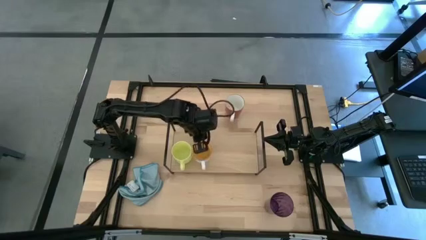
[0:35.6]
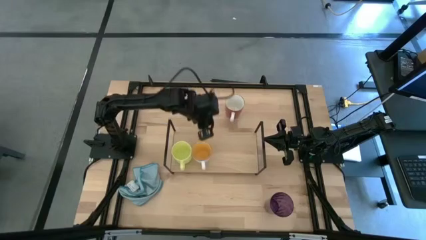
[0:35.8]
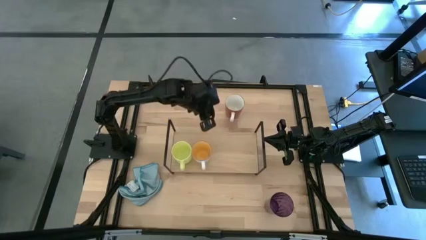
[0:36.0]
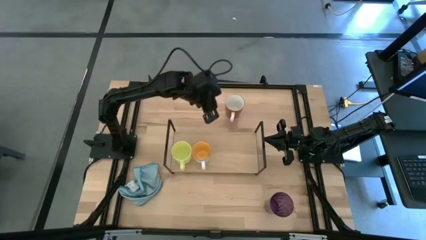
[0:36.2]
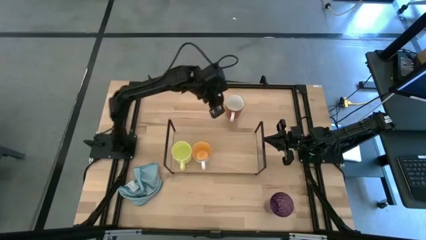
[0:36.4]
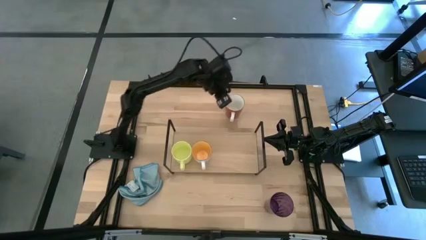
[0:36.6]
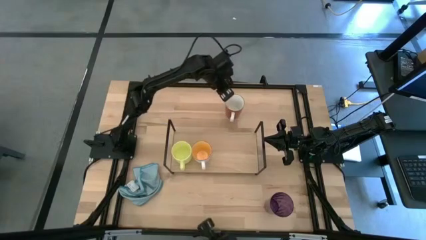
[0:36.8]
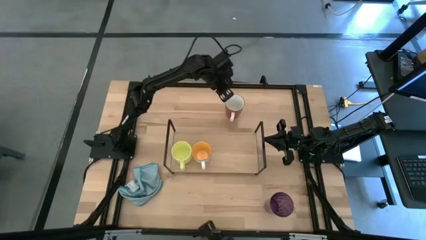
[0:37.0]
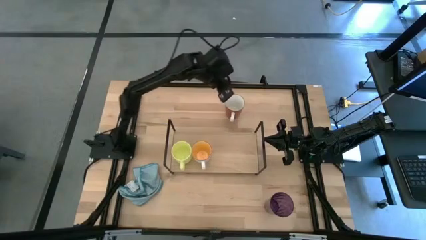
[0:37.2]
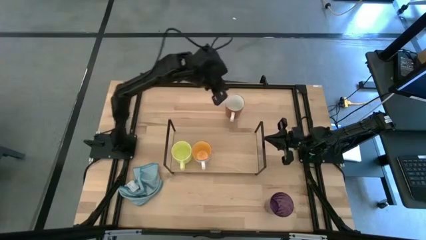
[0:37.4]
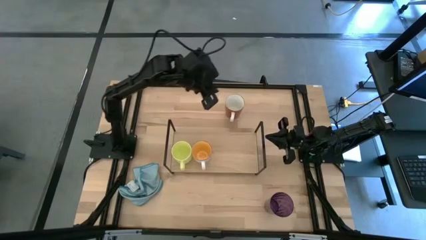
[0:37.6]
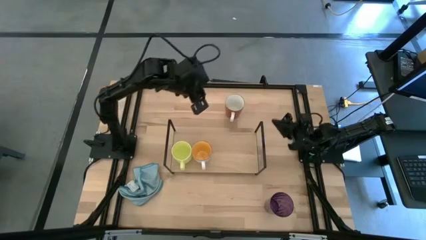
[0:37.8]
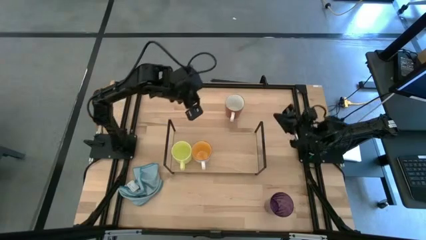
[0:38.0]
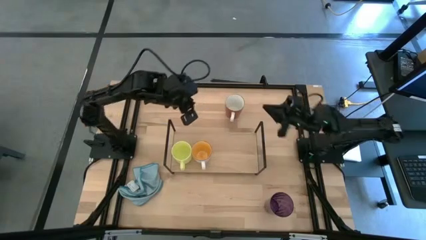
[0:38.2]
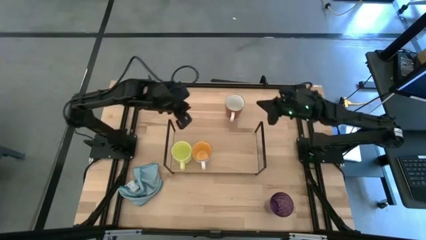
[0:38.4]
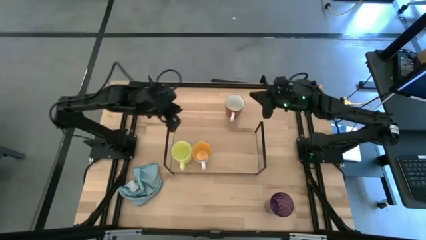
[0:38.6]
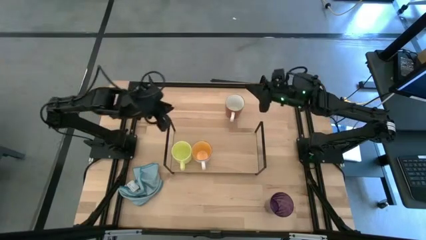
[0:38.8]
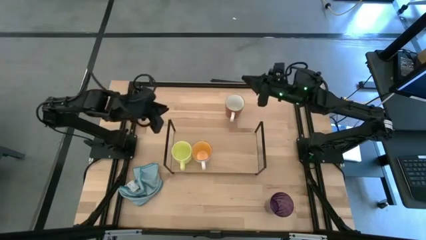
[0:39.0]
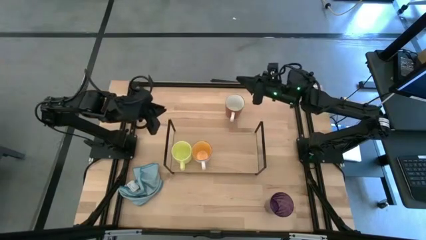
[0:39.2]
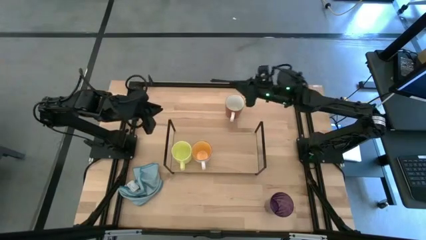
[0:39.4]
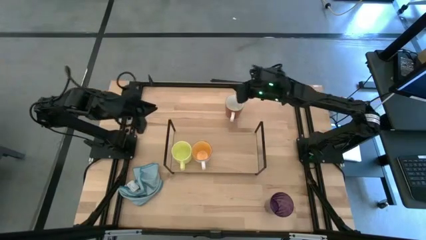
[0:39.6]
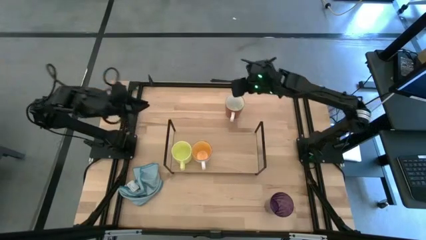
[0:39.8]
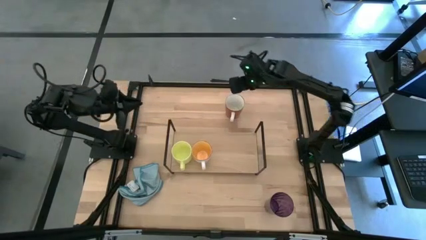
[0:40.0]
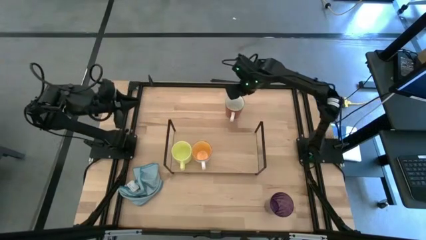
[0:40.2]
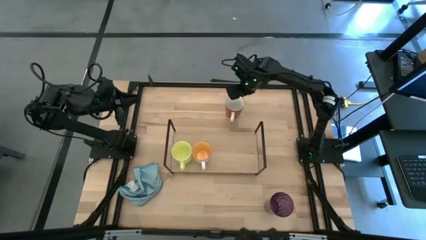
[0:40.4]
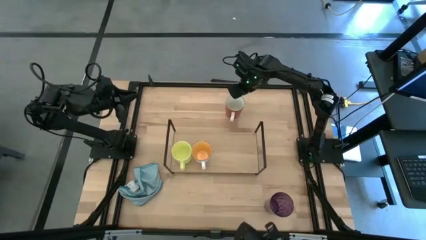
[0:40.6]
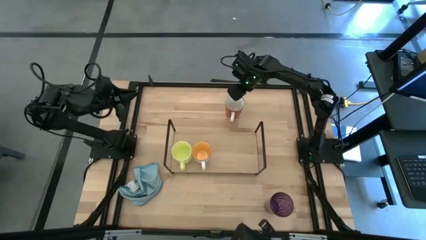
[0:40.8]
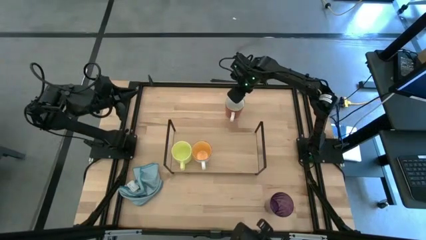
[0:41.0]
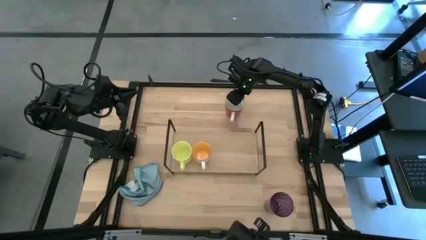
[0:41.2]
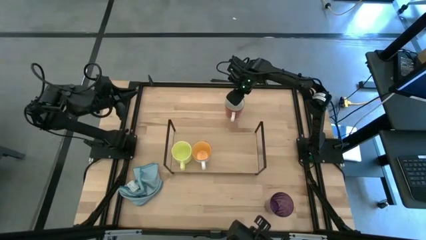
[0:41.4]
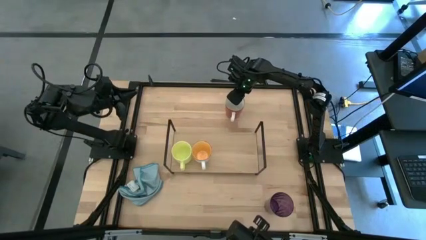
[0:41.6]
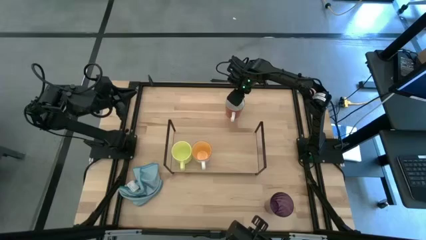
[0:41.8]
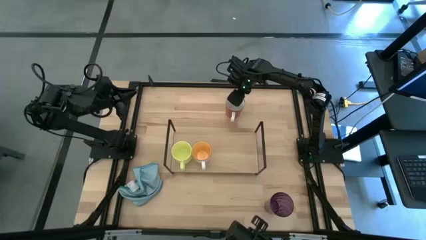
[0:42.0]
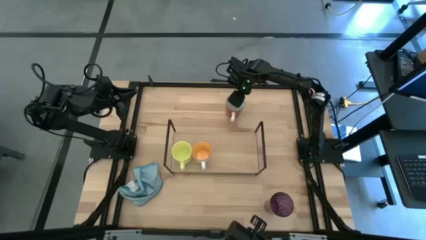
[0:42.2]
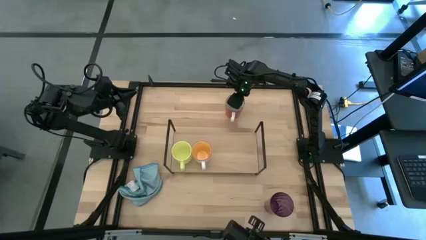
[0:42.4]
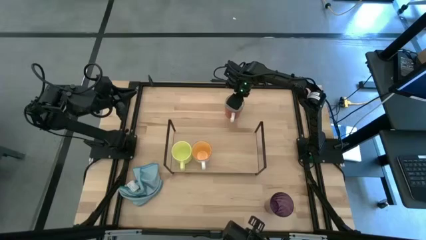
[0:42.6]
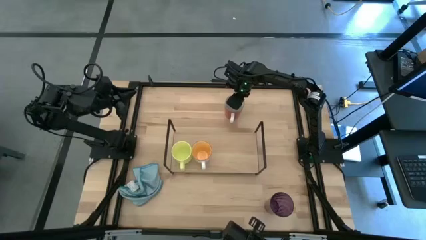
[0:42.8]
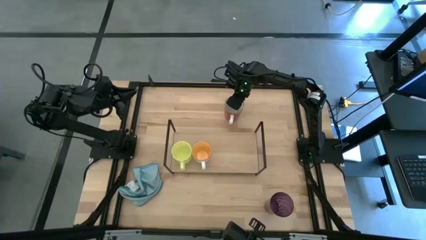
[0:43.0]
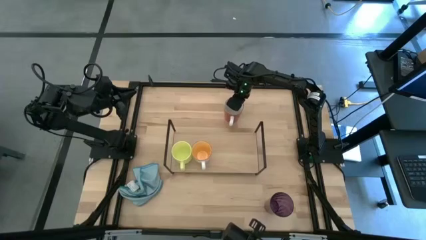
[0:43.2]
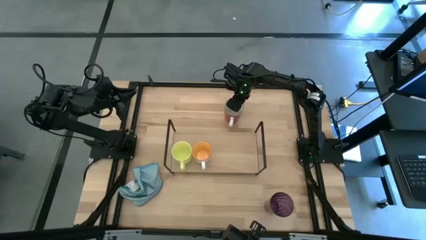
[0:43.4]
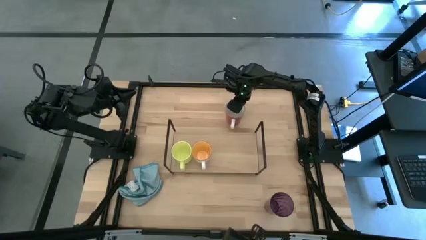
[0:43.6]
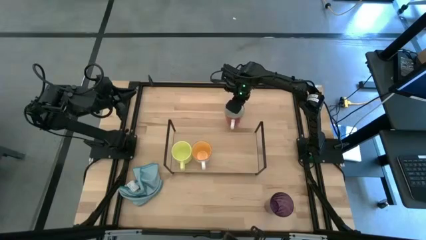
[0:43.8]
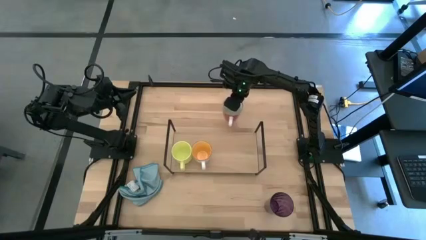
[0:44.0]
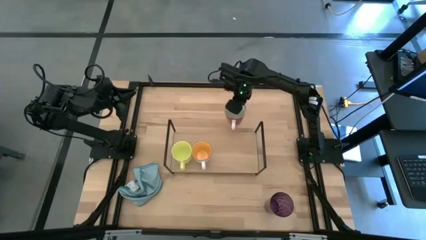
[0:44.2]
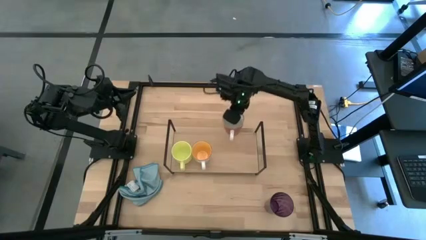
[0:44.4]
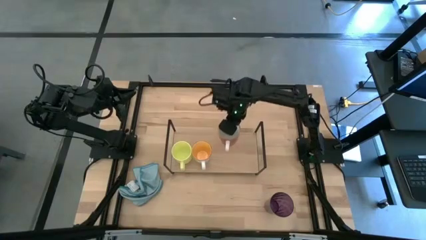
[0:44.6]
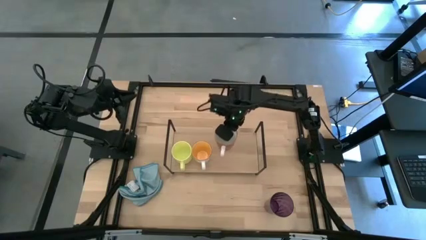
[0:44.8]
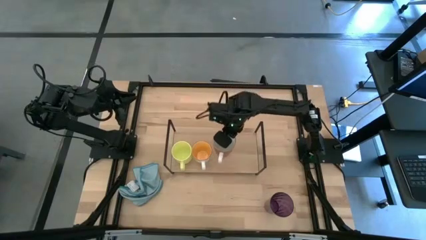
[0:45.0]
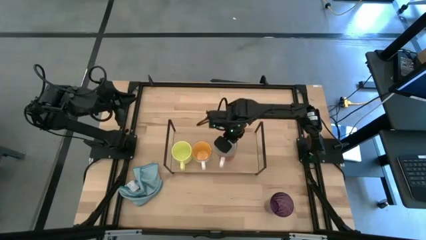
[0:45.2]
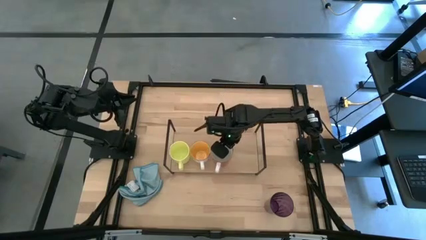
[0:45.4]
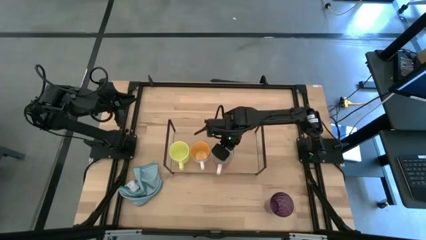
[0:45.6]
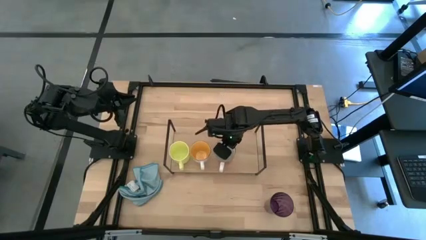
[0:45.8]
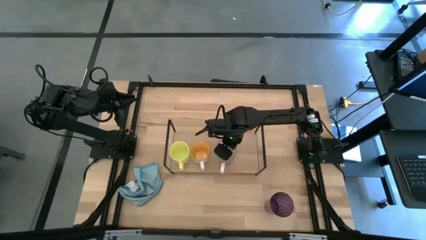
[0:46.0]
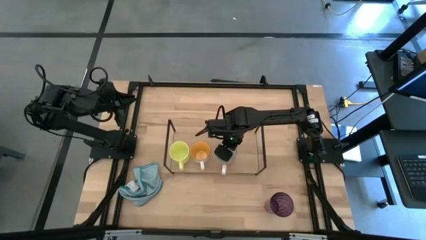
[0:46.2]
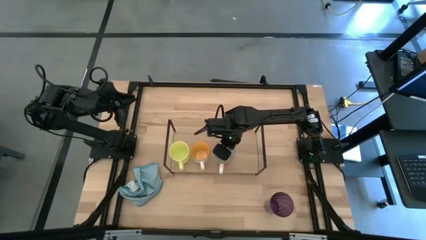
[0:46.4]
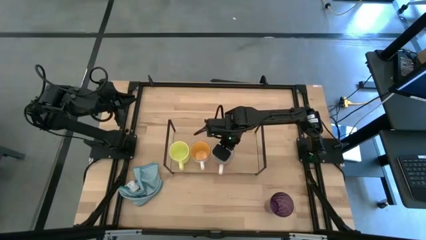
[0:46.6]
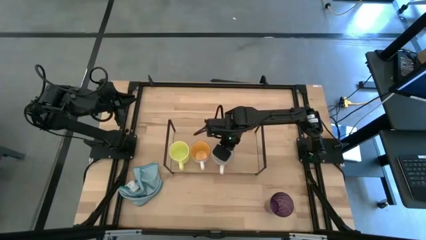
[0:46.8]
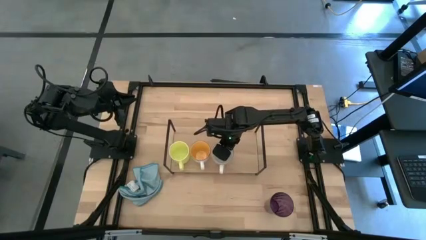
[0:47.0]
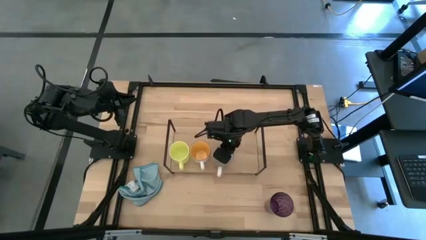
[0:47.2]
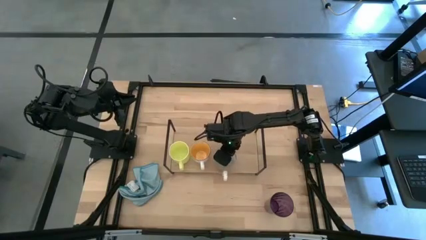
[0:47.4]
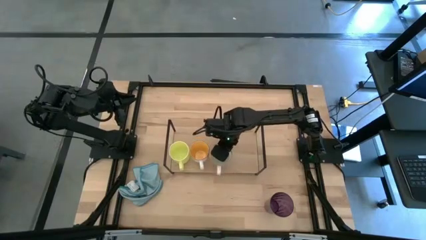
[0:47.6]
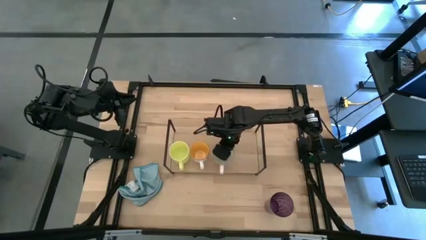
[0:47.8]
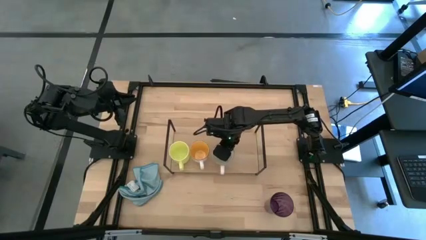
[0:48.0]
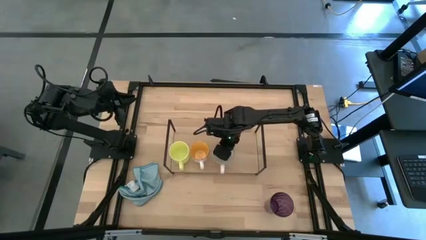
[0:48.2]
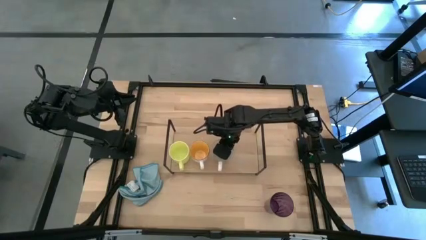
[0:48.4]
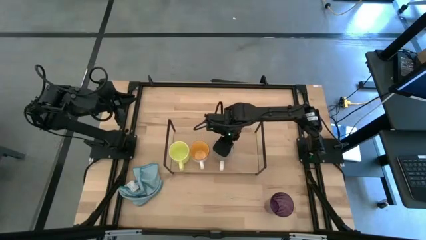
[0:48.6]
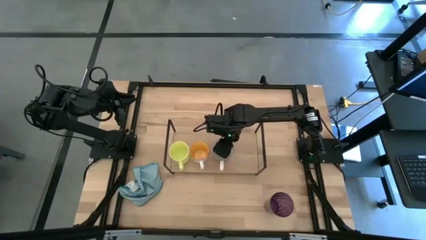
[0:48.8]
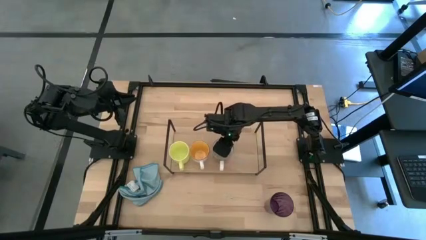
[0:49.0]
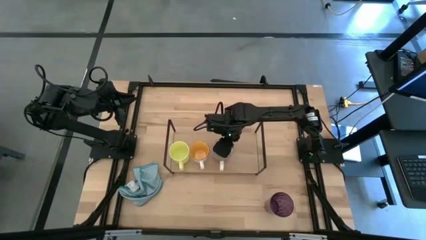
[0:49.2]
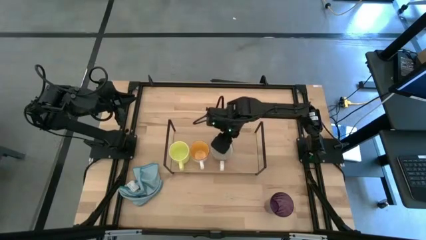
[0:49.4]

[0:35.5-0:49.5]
Task: Stack small to large cups/mugs on shelf
Put the orange cup on the shelf

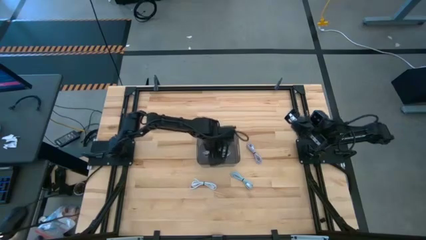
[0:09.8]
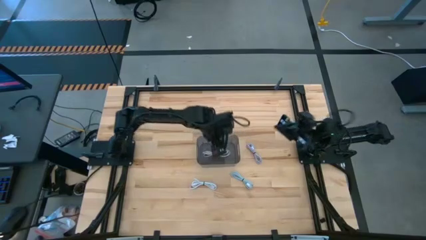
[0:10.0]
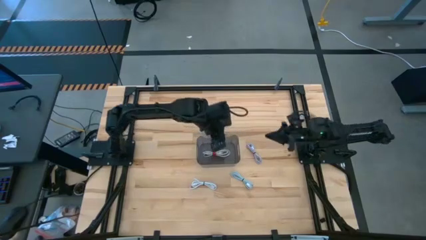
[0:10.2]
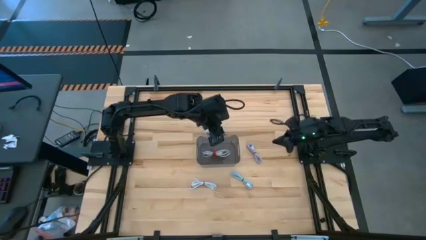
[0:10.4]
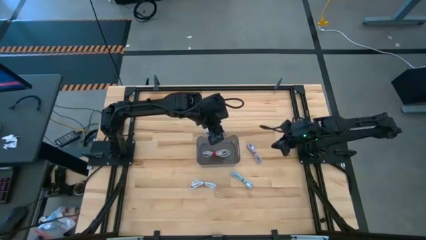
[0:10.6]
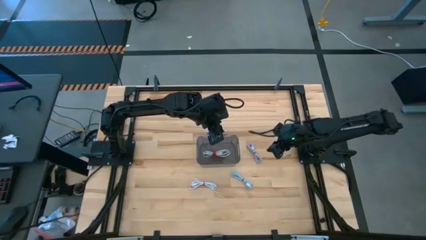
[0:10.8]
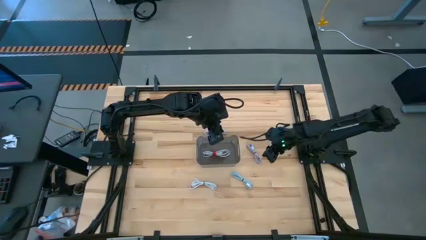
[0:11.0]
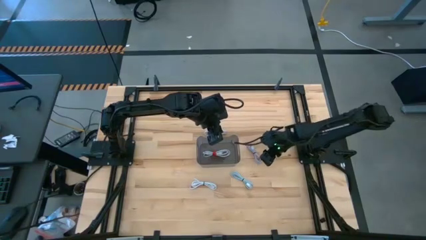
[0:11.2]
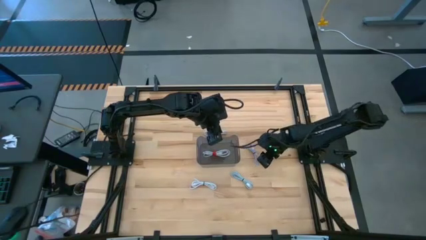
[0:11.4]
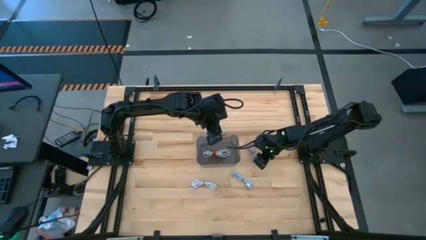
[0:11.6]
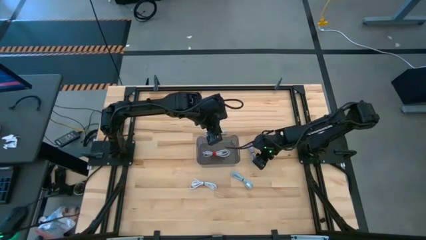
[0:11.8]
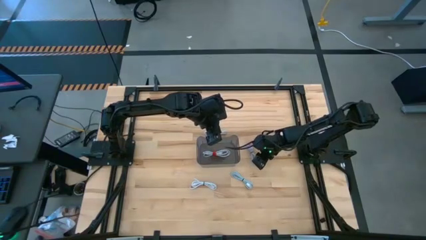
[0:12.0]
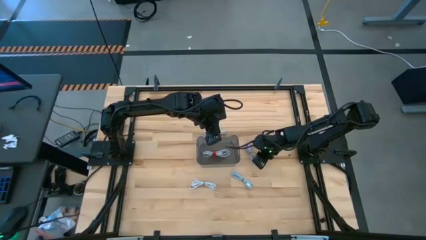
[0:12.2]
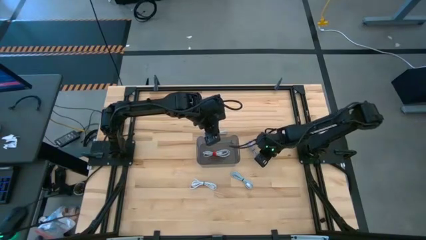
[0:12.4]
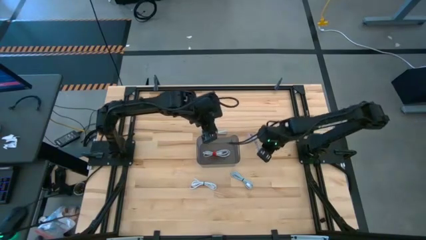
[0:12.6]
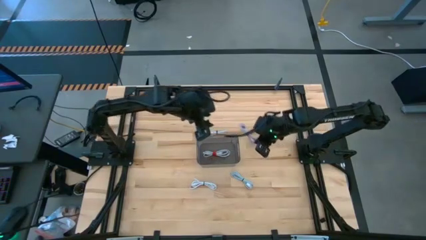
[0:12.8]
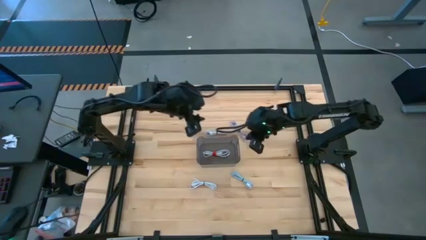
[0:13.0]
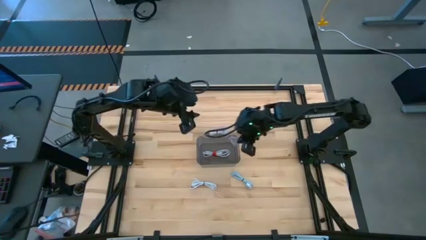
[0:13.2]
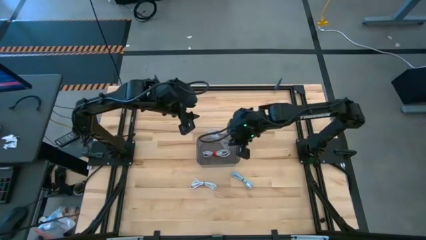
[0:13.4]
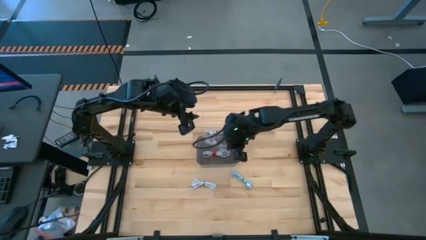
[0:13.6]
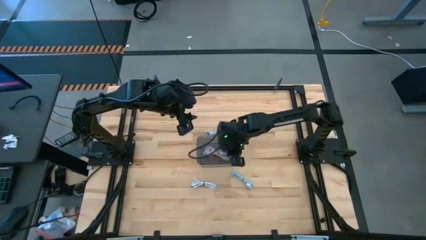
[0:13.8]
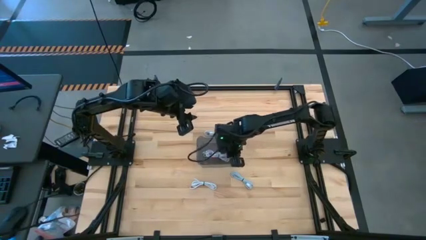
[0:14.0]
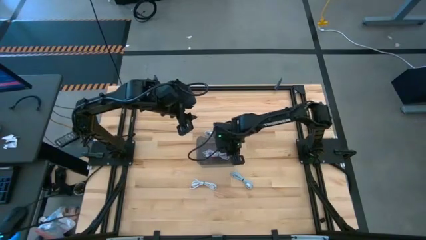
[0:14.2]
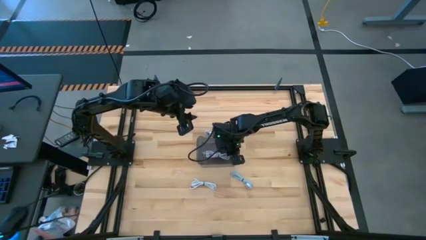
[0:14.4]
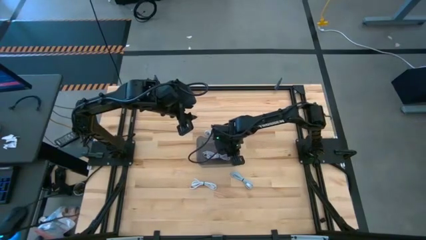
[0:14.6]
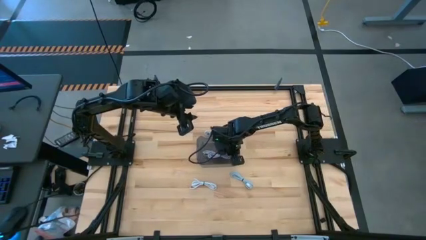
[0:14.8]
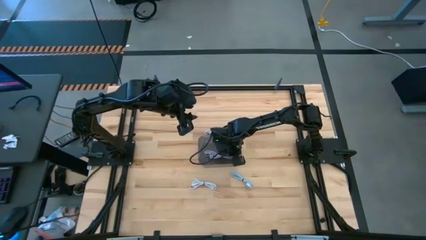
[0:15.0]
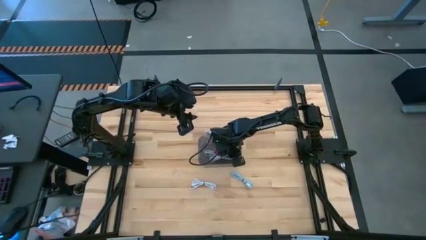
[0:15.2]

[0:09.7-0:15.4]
Task: Pick and place USB-C Cables
Put the light gray charger cable into the transparent black bin
